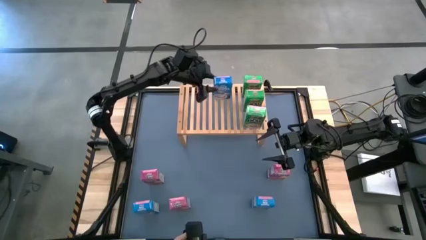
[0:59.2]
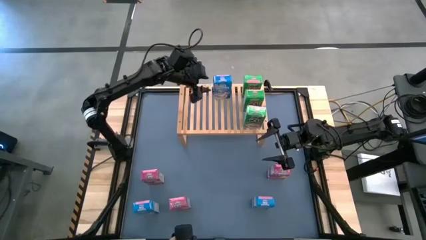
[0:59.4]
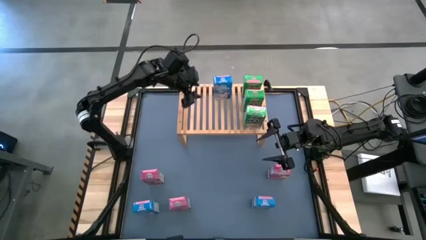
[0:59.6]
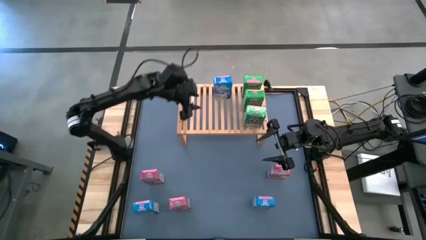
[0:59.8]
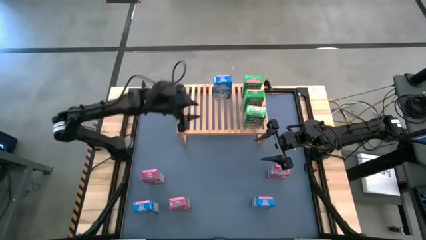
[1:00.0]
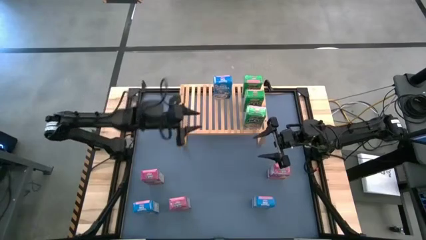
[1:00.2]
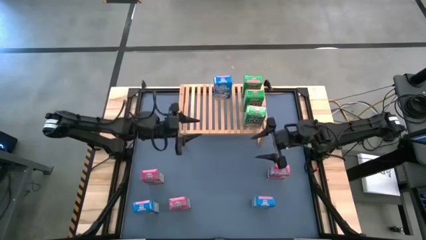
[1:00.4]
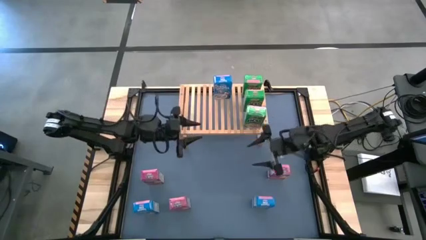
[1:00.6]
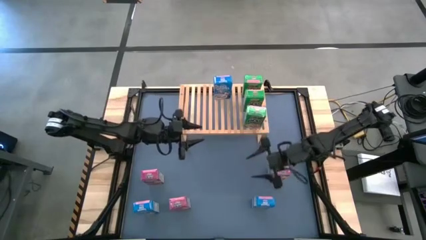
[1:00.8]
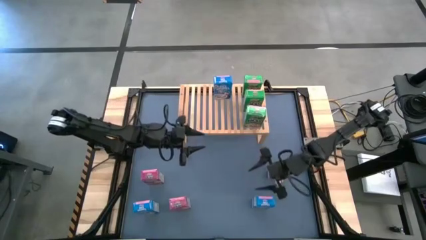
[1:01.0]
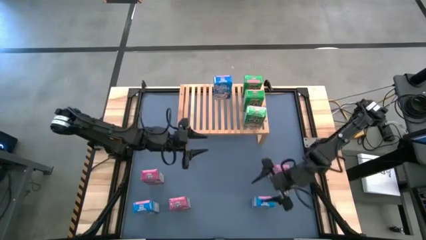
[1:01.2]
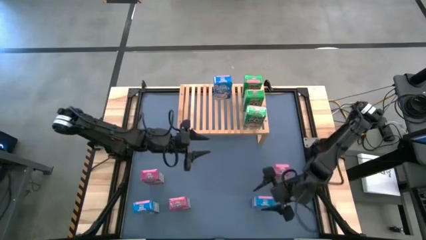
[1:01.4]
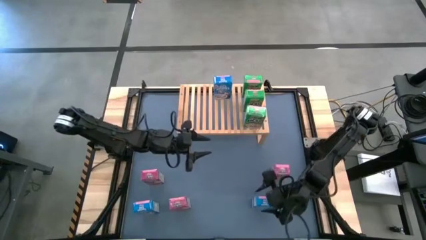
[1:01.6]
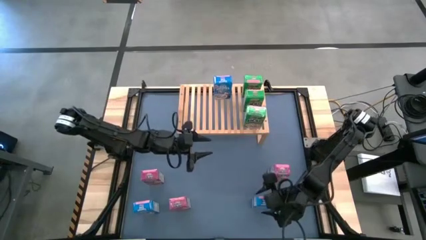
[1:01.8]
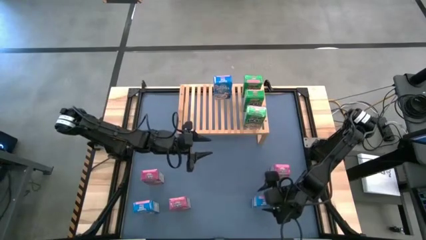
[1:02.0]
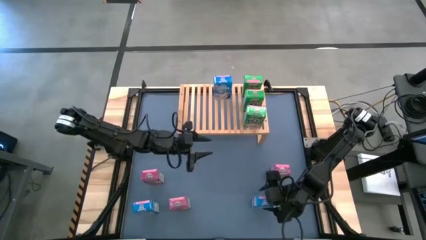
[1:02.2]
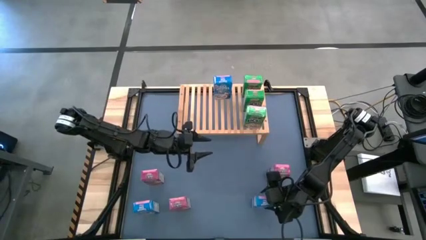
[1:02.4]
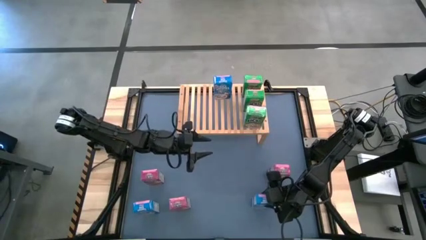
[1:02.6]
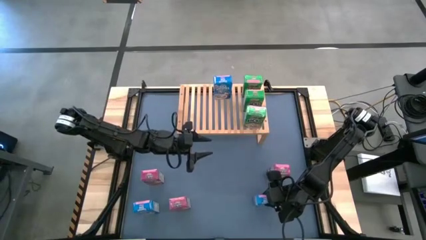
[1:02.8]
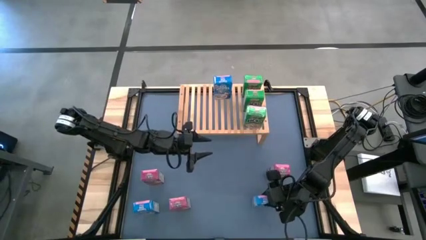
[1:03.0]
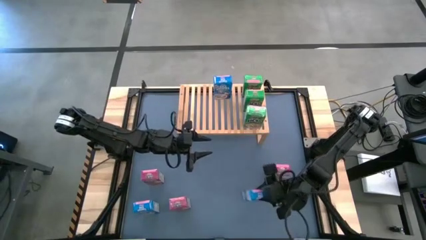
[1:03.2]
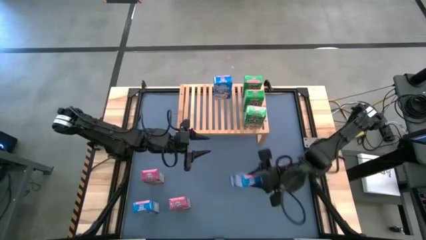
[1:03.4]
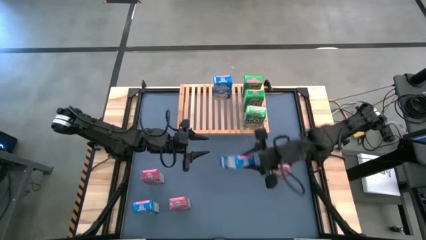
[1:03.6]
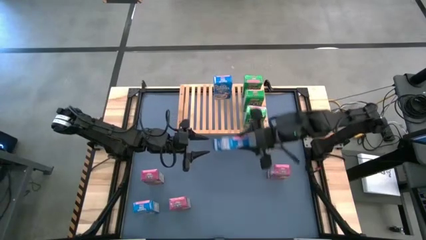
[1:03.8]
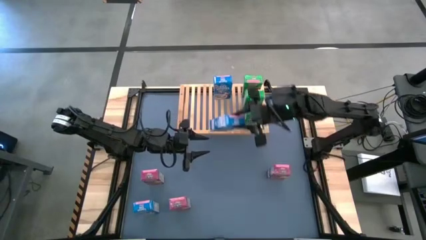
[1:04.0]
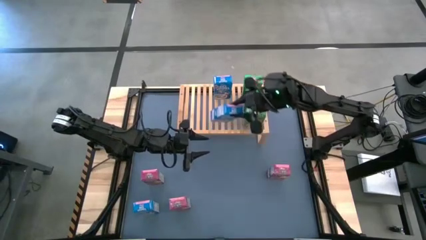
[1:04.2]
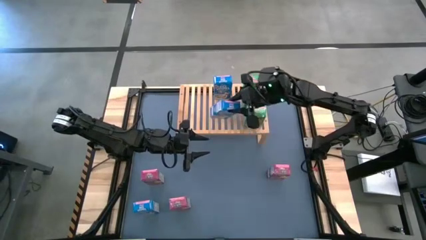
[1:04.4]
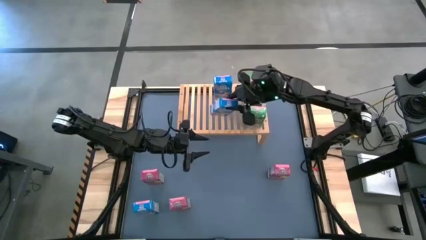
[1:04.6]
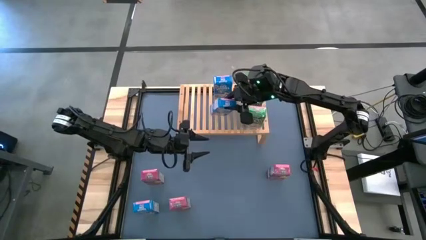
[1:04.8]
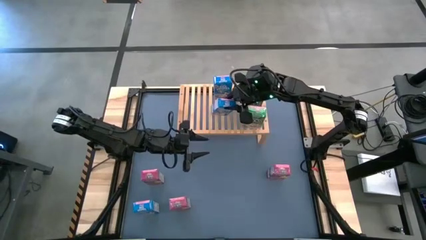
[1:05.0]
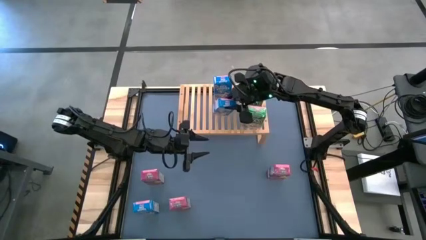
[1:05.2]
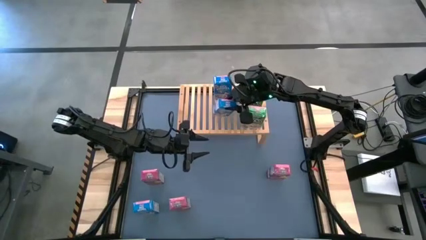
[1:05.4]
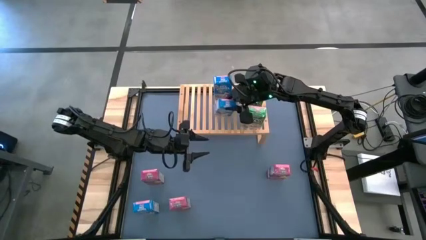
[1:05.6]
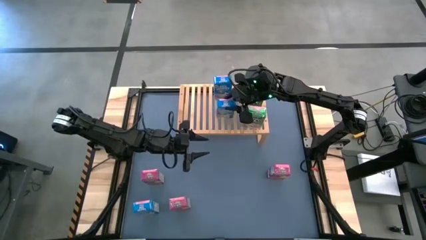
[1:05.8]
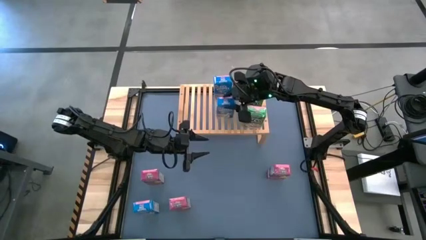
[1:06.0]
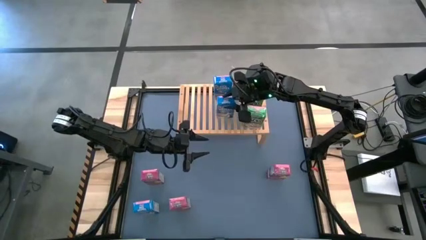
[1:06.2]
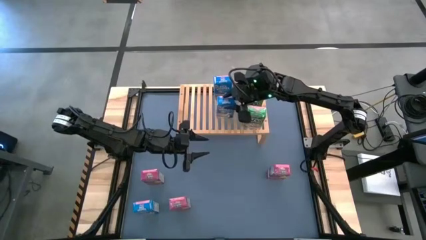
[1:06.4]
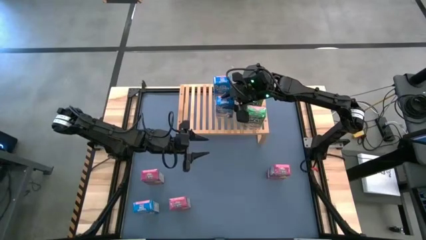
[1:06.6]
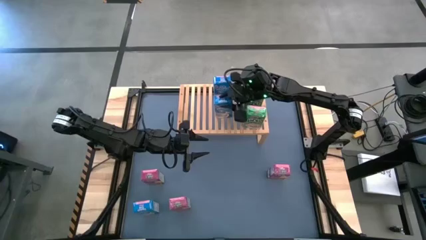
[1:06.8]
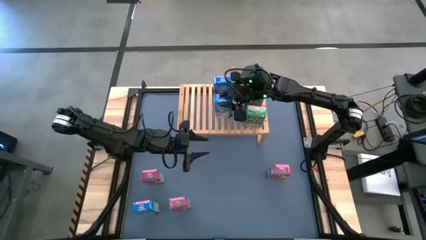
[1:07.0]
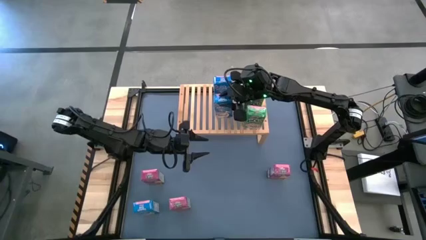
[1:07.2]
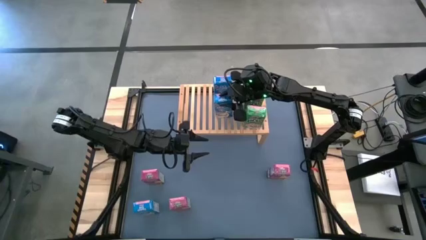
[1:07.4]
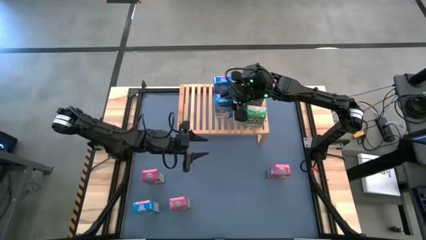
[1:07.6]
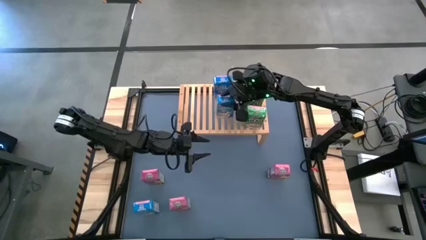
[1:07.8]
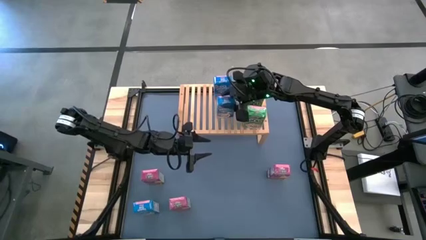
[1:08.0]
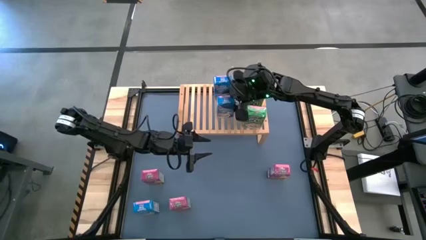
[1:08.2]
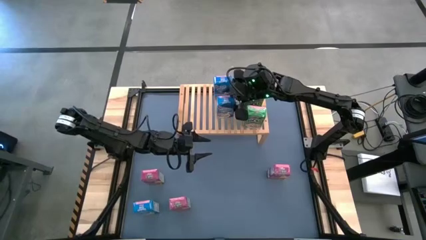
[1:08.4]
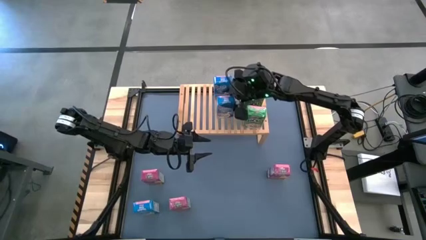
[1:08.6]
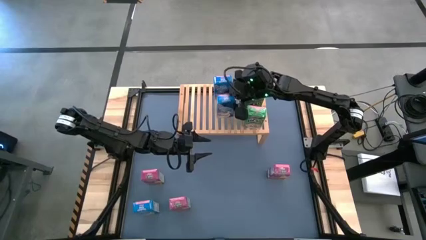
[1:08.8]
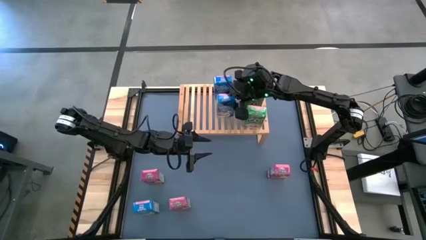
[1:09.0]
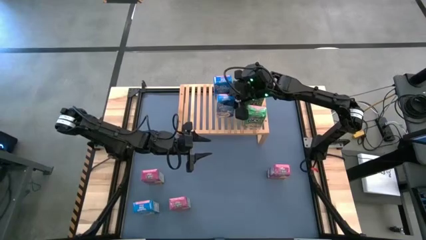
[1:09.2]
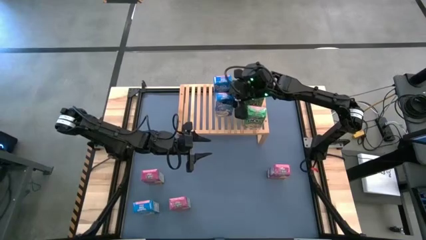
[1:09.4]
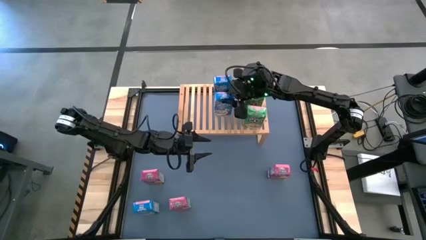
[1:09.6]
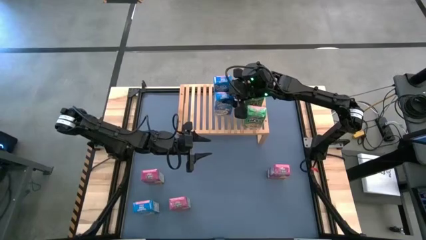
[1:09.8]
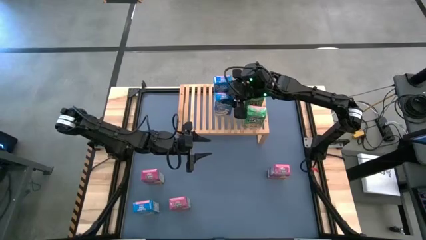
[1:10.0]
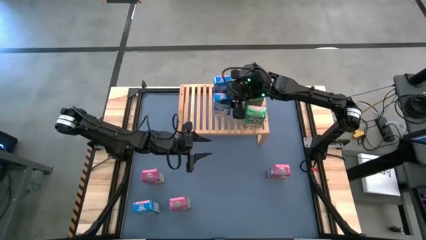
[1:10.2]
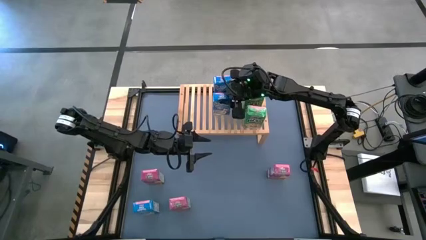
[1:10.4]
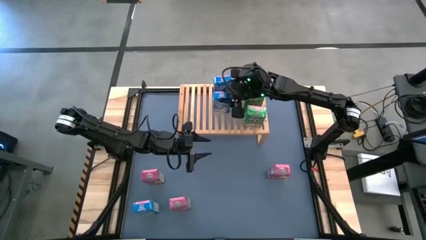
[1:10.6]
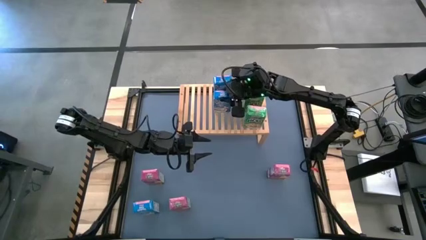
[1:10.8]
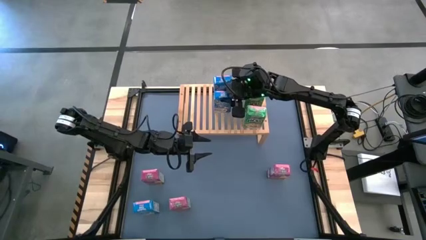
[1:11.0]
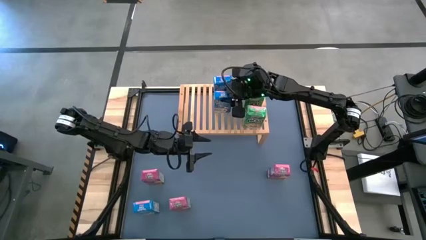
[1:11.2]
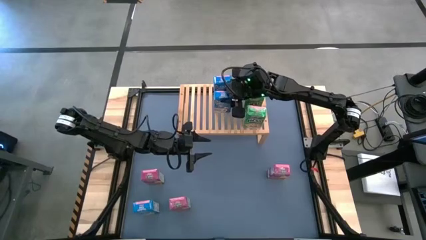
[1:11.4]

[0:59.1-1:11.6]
Task: Stack cereal on shelf
Put the right blue cereal box on the shelf aligned with the other blue cereal box
